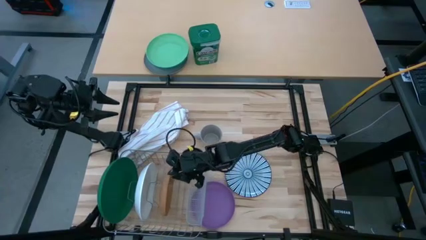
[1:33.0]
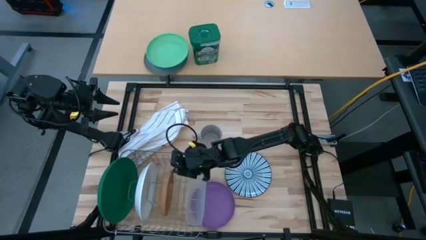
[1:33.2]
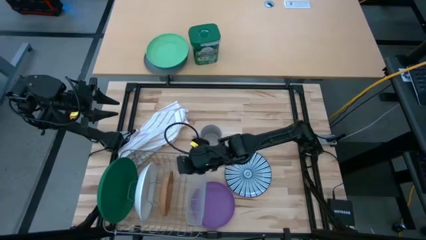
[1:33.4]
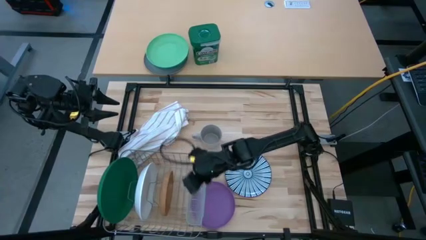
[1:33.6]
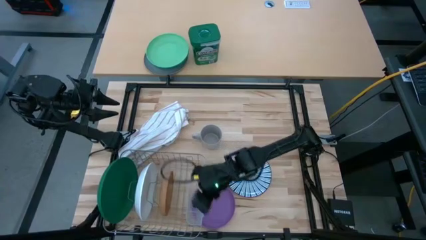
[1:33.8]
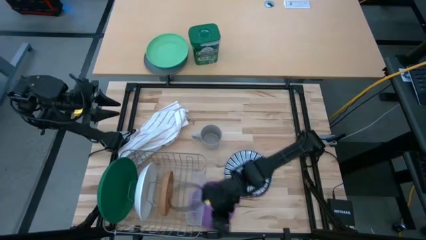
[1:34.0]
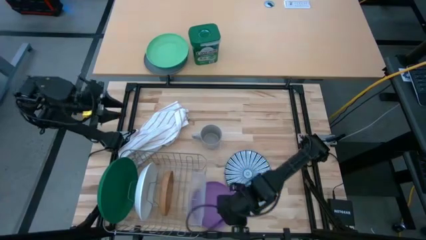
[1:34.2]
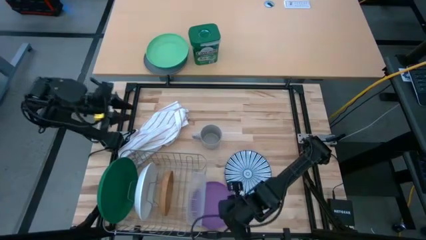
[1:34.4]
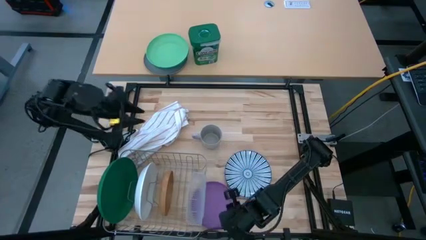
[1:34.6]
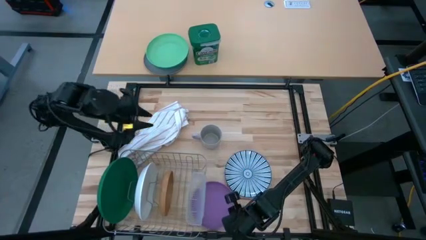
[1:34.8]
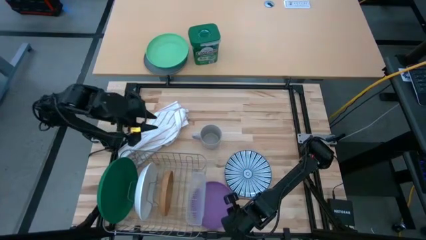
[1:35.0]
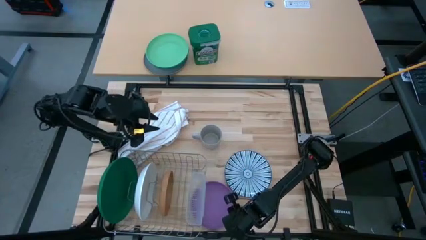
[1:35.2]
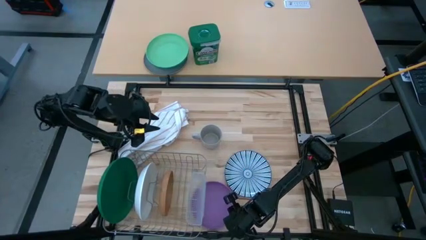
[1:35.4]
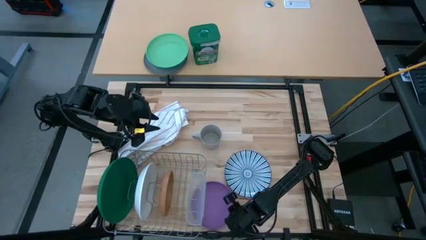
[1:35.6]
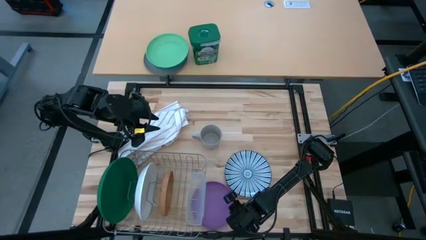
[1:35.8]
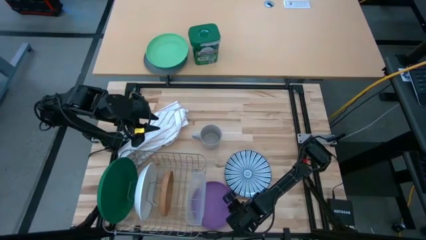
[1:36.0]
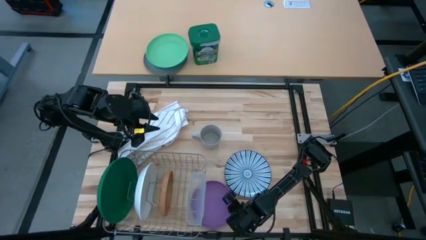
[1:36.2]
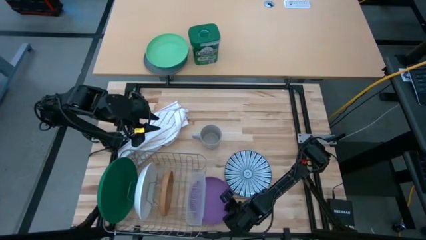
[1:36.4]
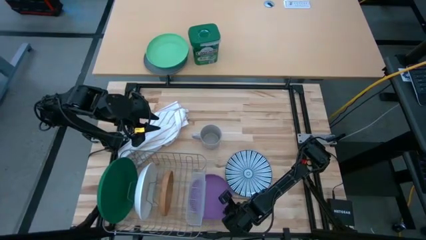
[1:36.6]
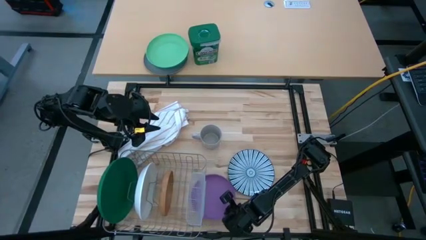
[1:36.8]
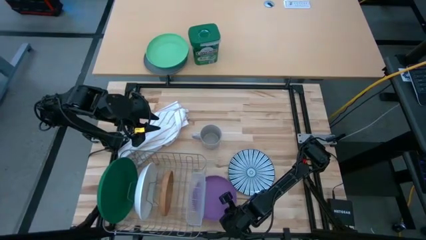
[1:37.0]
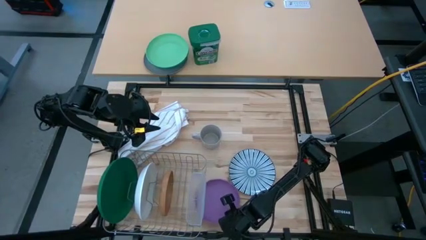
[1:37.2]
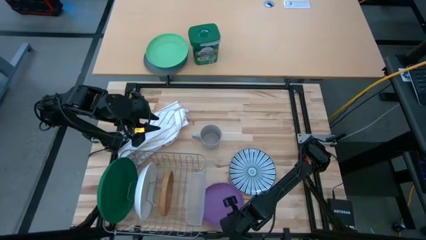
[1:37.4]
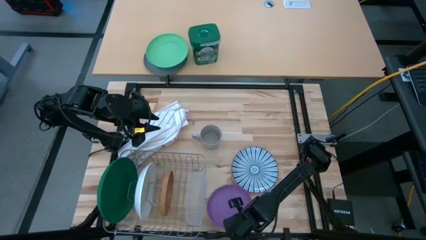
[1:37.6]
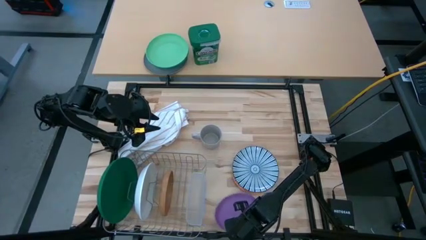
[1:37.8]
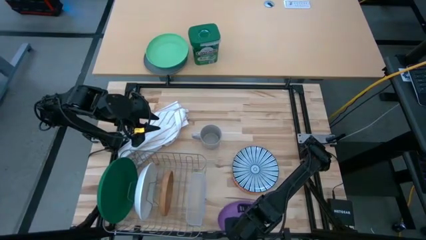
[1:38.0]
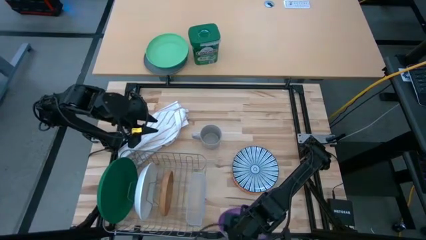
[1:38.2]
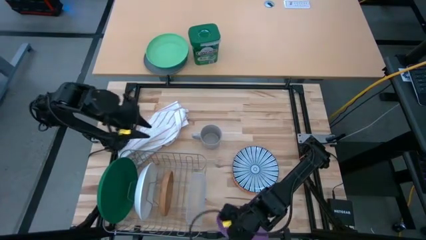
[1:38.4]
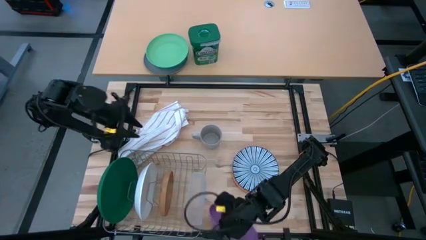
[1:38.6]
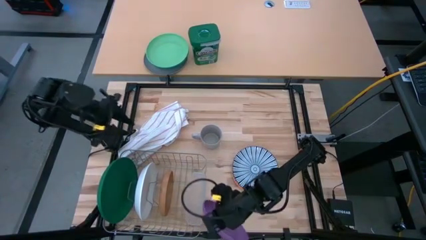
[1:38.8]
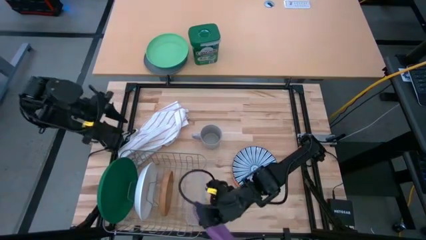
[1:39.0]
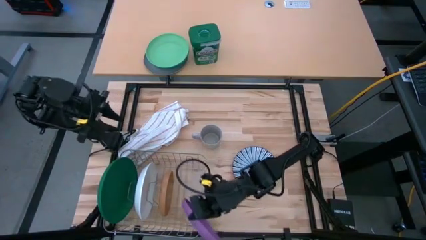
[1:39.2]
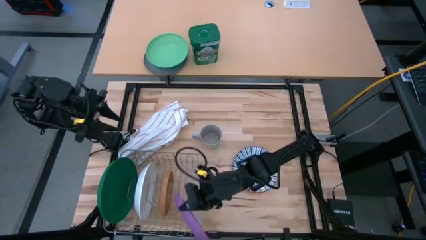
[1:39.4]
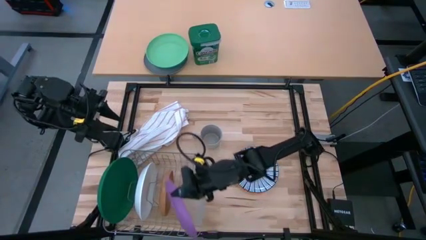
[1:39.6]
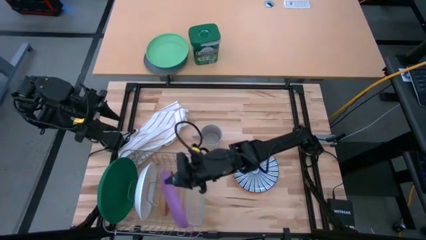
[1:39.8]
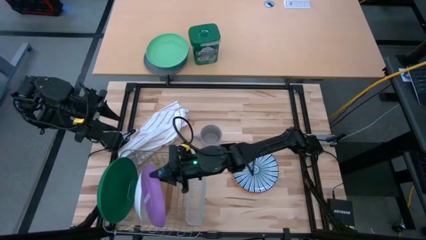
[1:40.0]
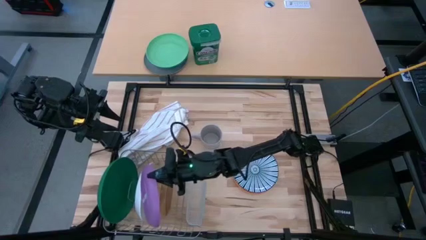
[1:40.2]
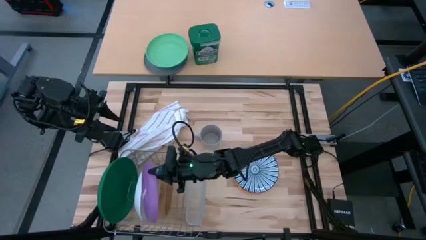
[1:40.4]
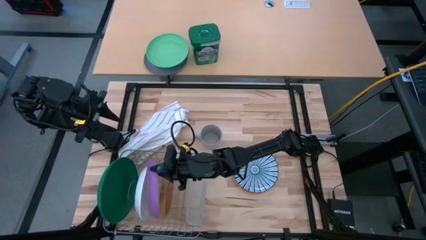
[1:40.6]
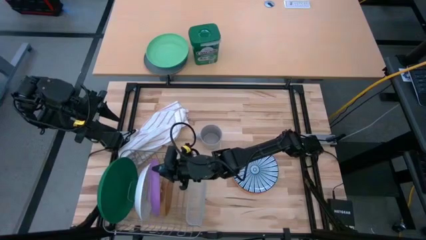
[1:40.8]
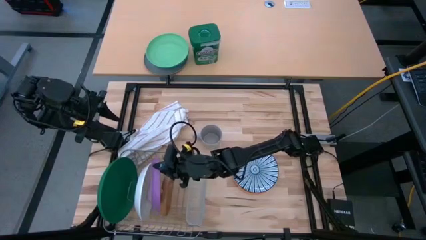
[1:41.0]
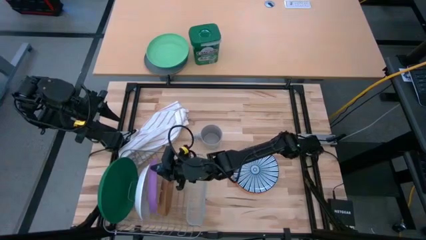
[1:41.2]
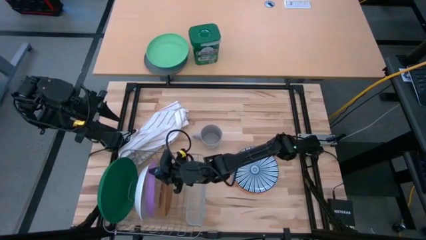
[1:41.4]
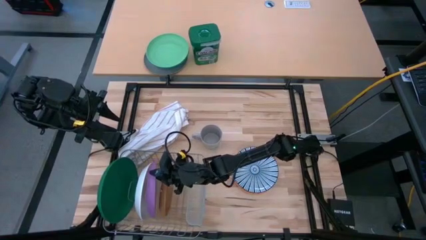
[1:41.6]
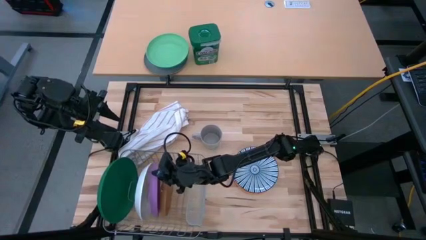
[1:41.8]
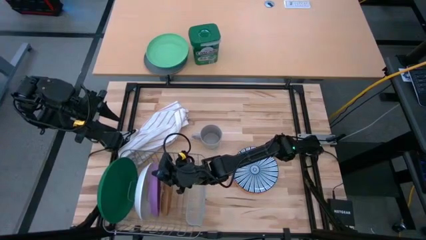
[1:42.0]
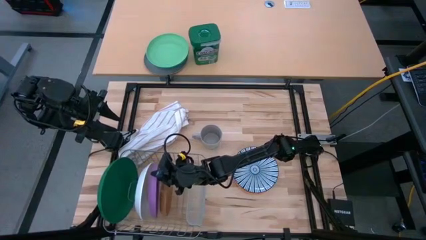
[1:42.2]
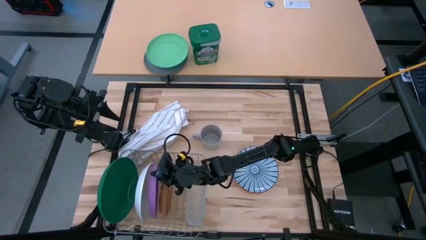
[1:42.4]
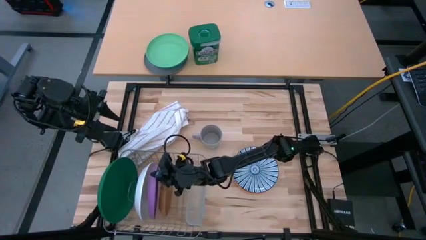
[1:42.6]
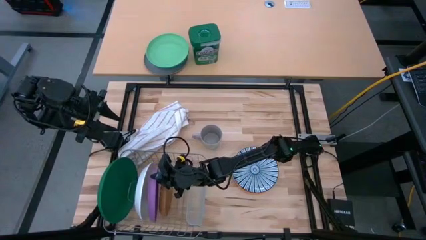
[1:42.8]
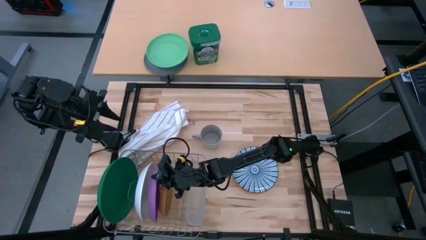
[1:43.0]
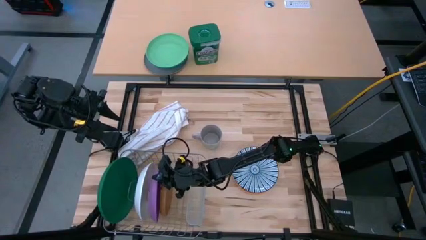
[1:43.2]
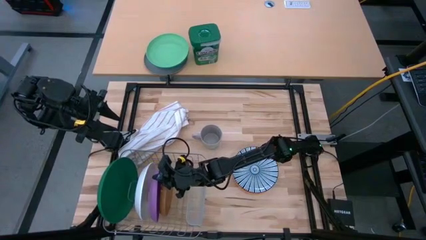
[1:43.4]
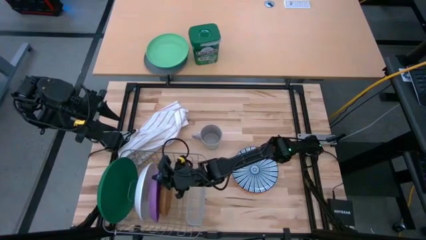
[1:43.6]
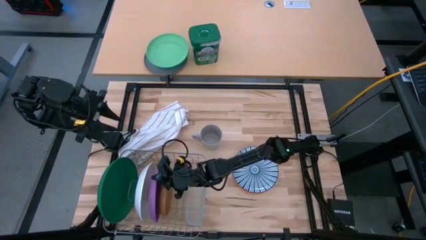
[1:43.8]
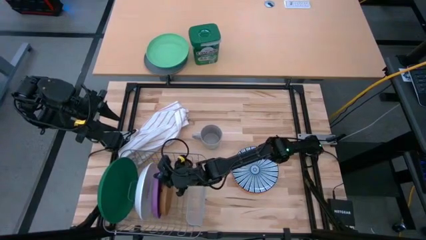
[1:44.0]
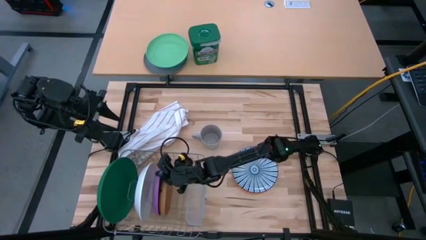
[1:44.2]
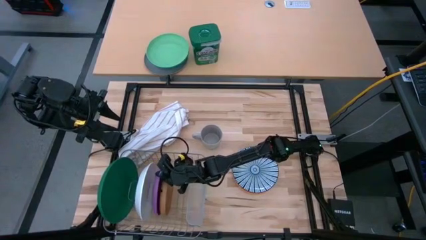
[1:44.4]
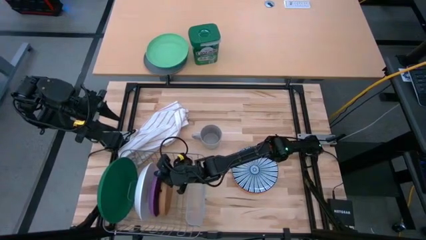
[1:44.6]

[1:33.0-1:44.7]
Task: Sort dishes
Put the purple plate into the dish rack
